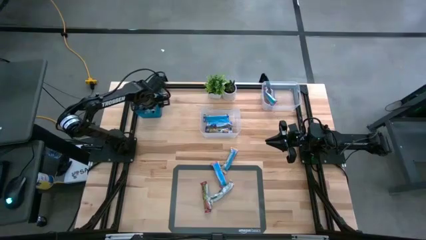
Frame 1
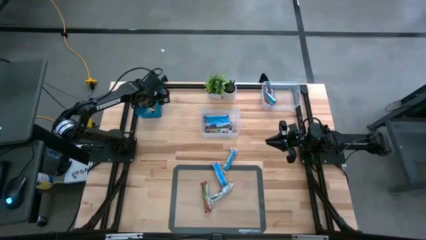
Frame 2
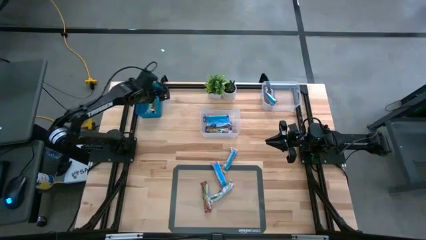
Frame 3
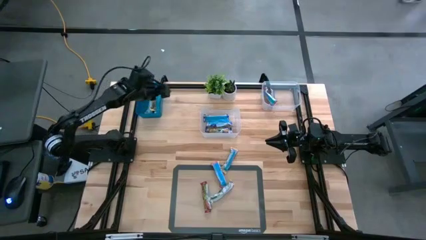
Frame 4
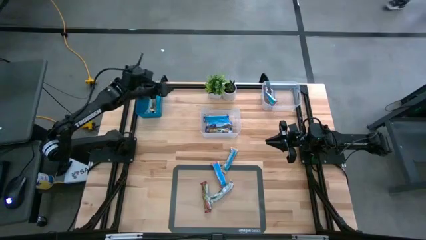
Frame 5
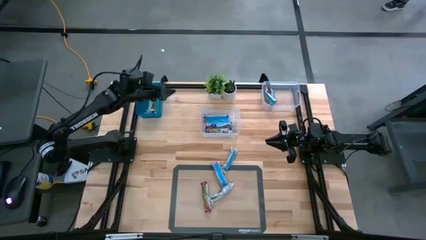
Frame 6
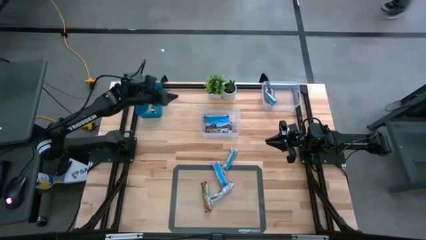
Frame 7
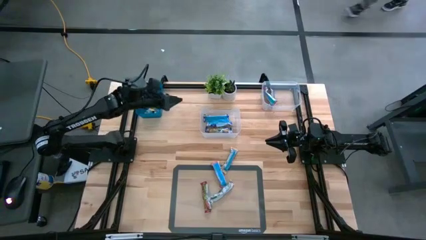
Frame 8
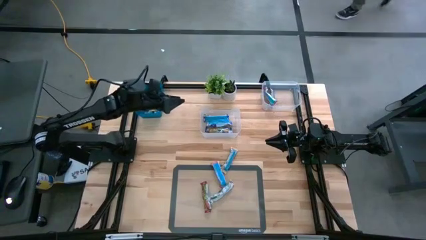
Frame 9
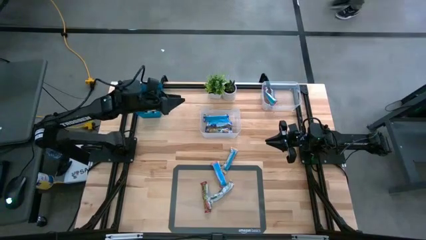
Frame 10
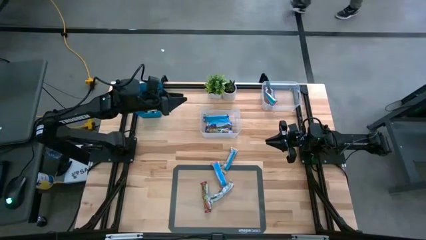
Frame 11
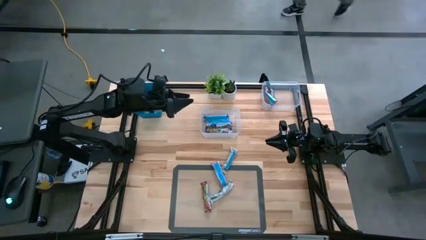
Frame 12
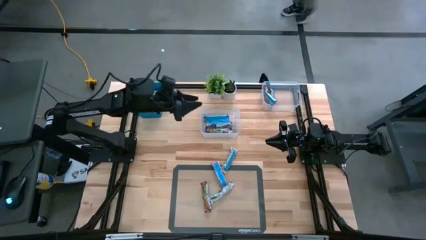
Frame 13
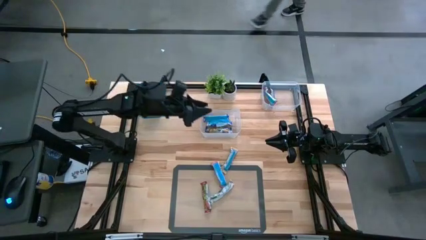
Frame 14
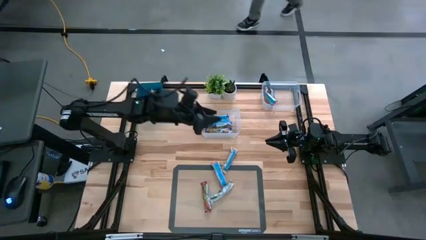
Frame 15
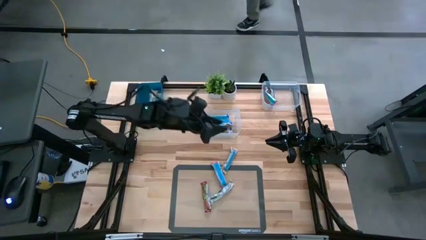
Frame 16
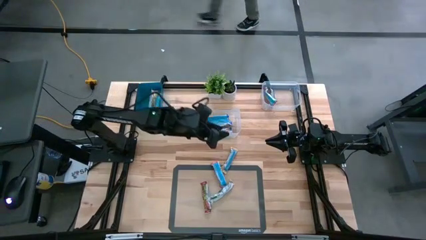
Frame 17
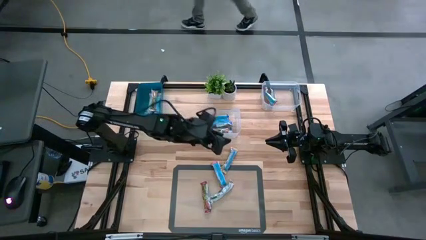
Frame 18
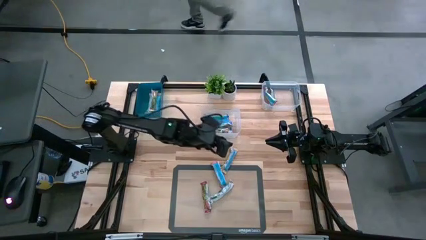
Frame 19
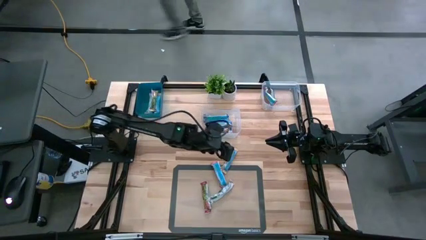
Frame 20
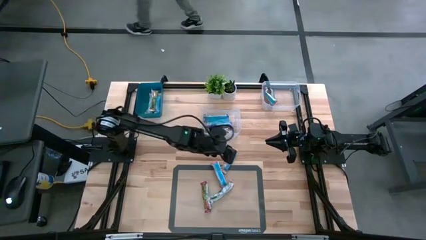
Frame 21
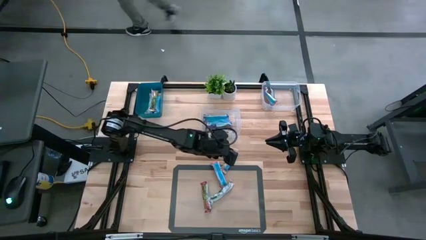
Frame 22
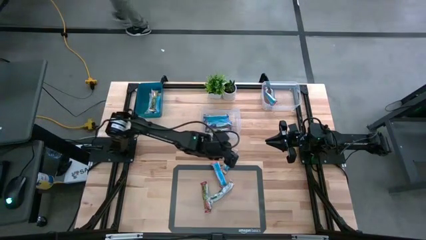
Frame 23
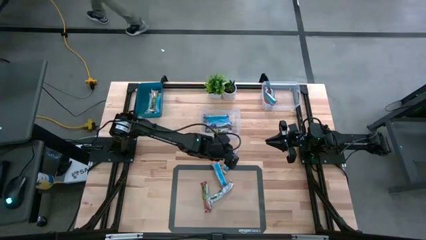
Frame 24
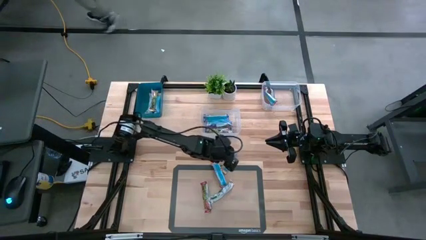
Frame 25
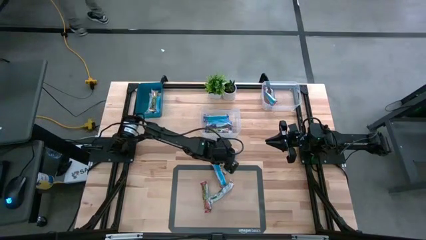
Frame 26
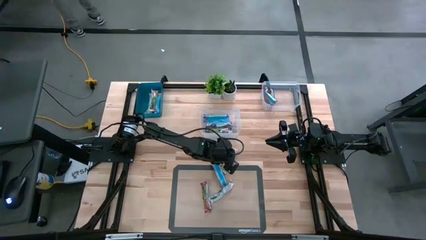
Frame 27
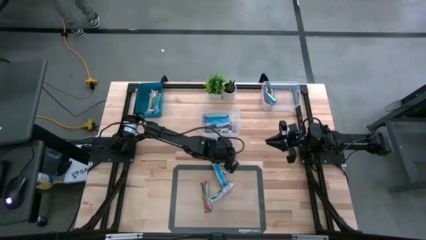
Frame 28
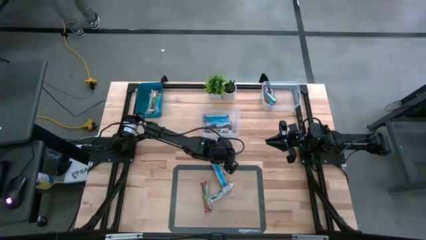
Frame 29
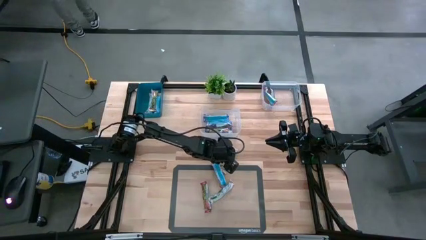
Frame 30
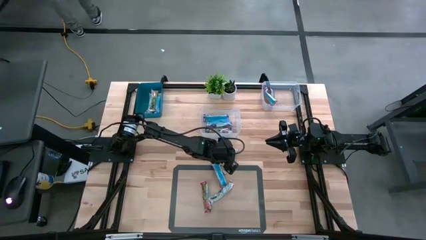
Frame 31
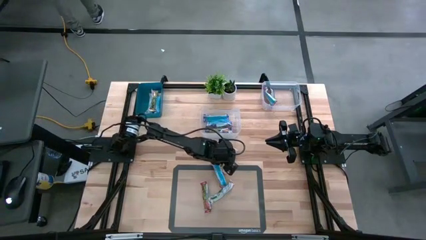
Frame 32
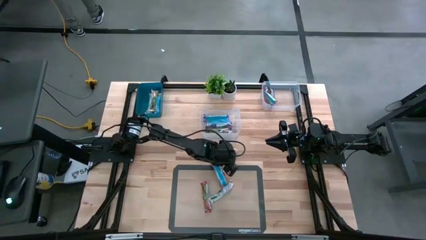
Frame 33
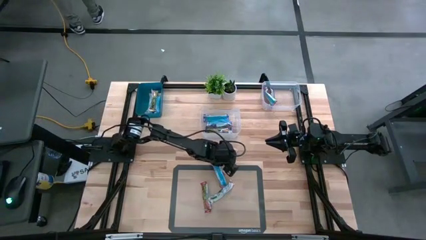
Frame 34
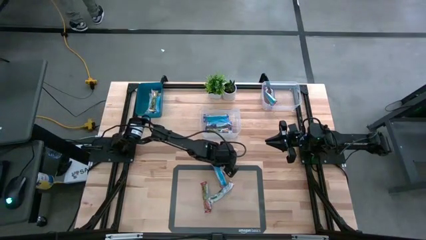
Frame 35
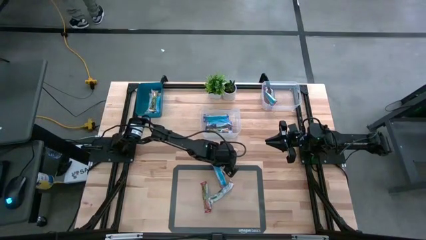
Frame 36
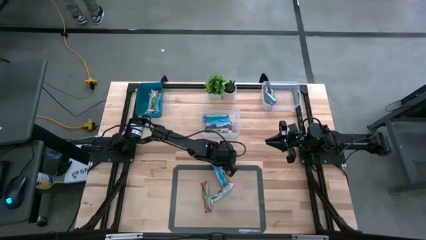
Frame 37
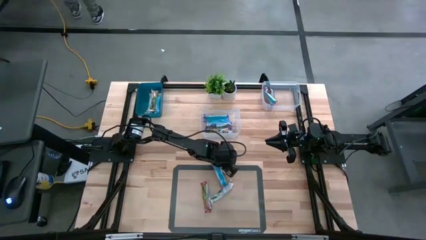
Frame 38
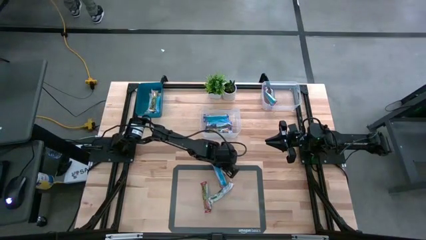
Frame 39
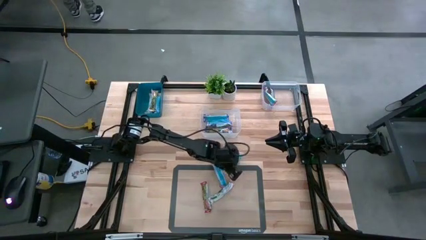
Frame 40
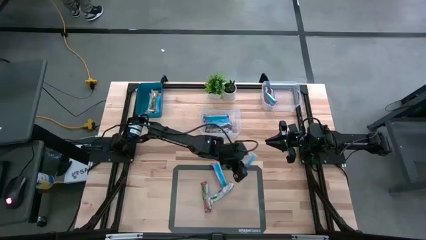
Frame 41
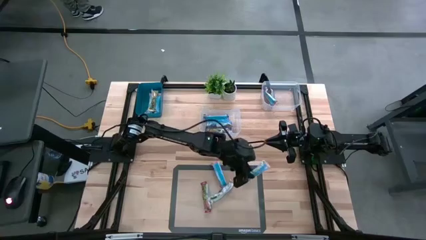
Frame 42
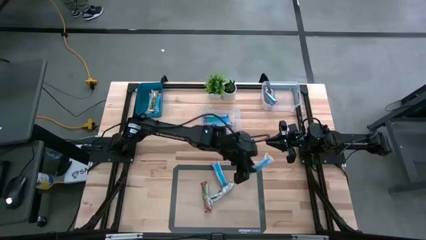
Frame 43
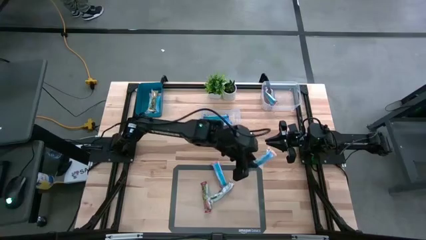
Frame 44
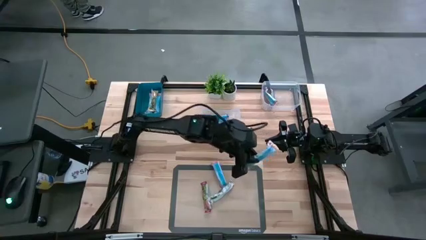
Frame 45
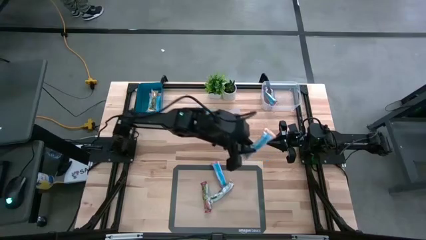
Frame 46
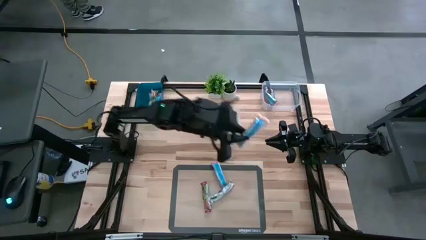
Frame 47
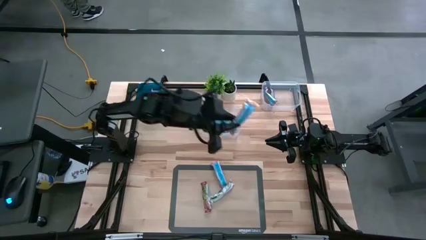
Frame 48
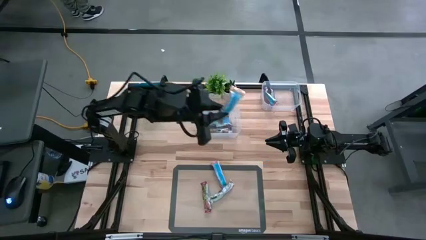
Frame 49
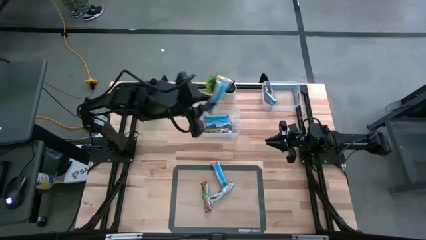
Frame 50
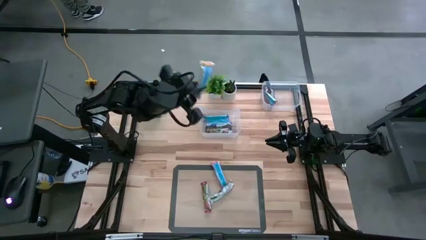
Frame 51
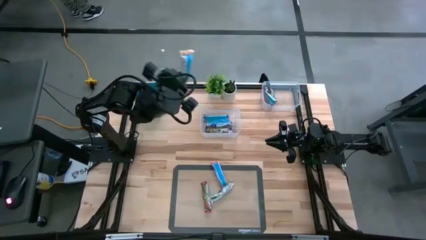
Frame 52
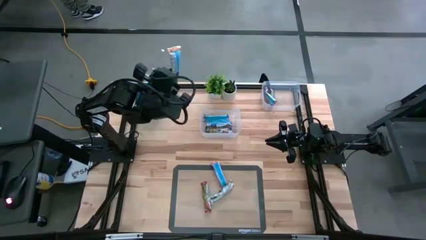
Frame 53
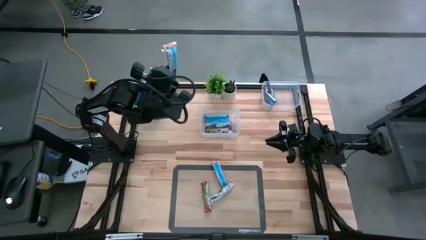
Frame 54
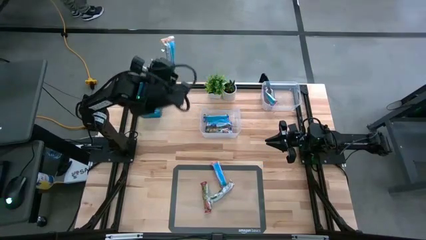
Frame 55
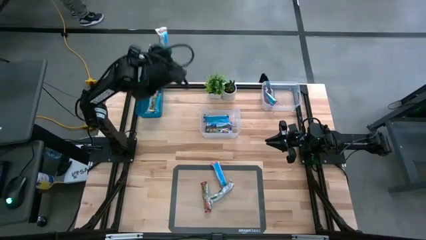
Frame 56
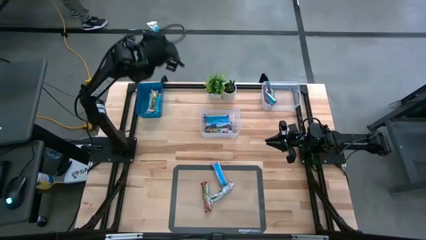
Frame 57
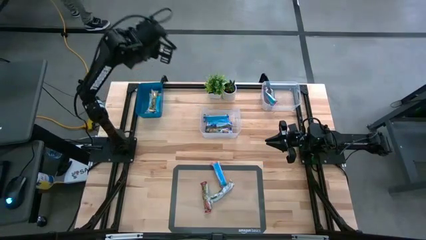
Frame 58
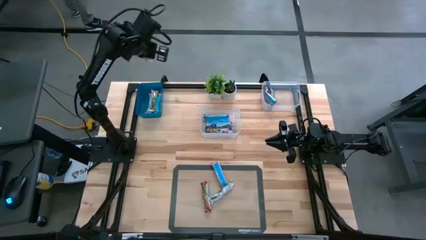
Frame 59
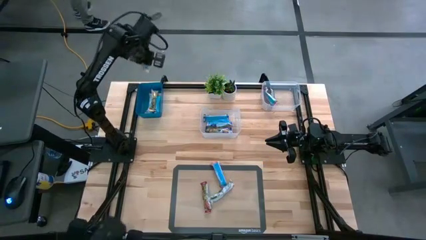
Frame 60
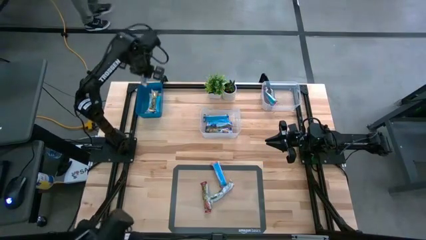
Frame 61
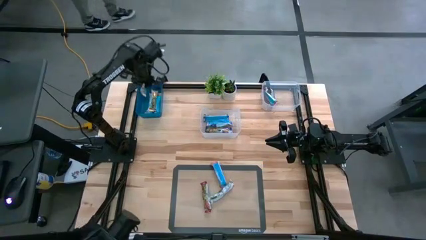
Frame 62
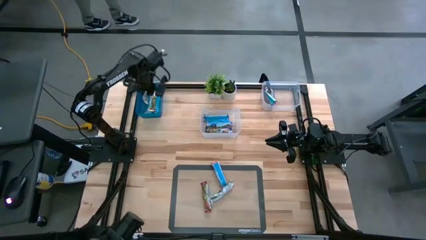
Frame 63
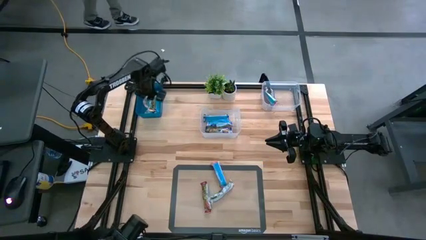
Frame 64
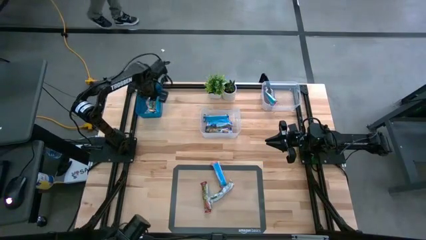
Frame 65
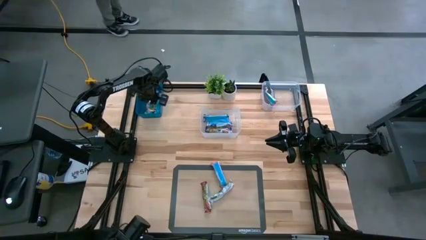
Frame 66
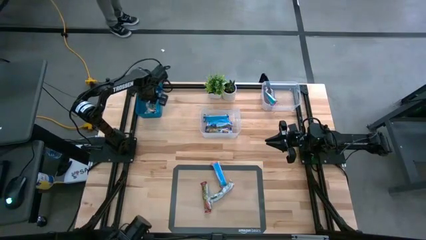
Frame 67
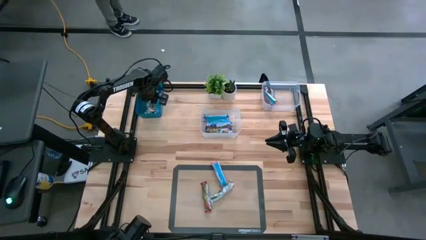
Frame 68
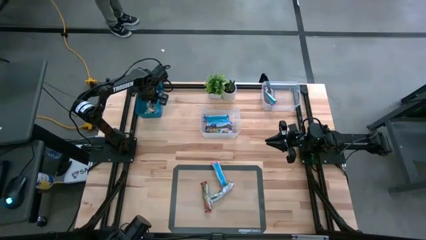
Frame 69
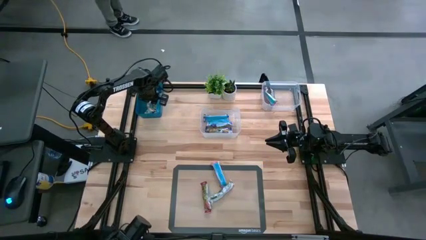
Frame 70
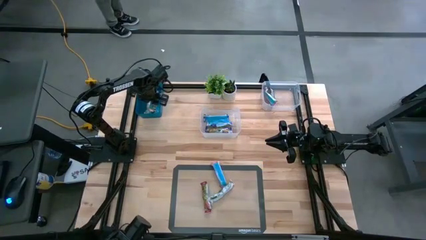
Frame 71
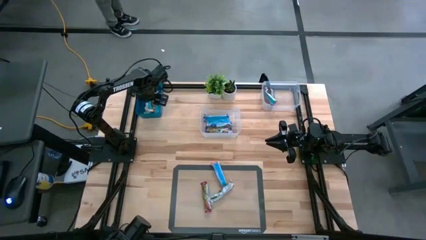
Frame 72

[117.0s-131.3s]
Task: Pick and place Granola Bars by type
Put the orange granola bar in the blue bin
